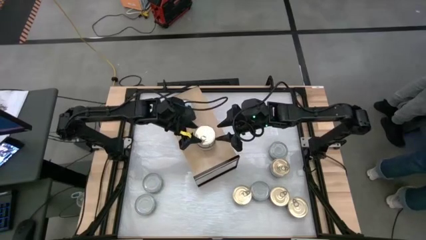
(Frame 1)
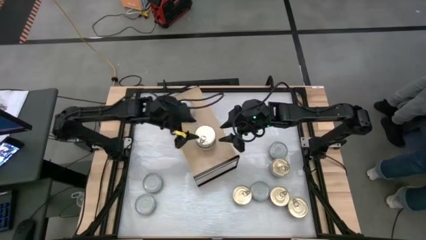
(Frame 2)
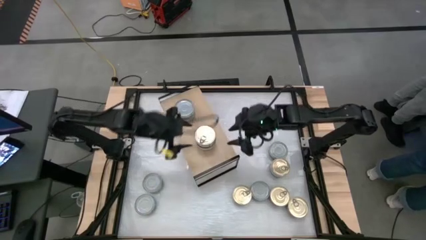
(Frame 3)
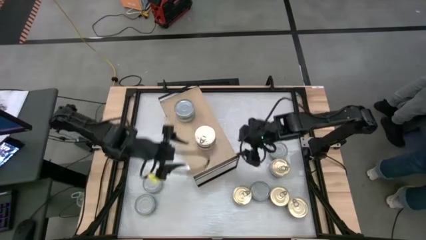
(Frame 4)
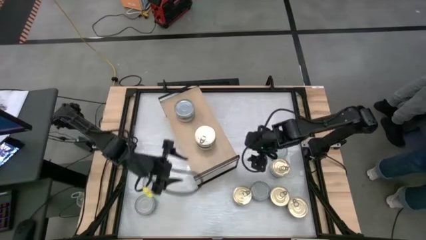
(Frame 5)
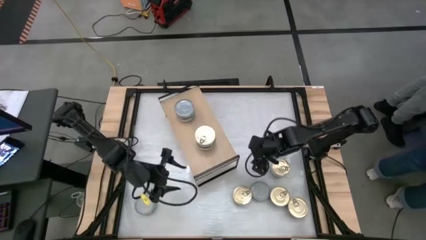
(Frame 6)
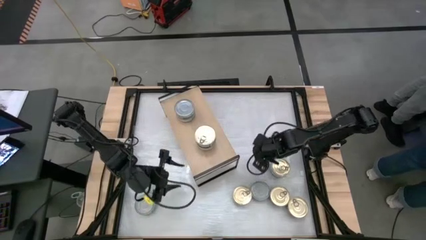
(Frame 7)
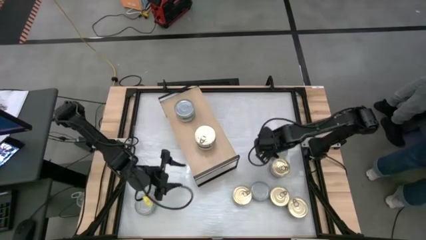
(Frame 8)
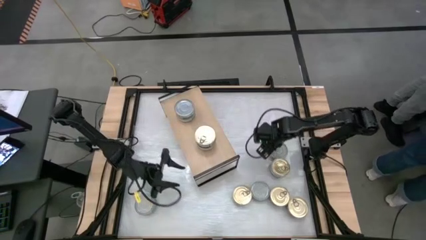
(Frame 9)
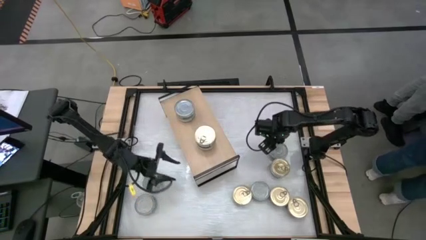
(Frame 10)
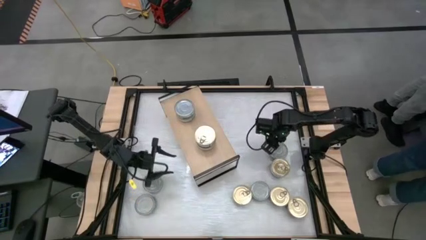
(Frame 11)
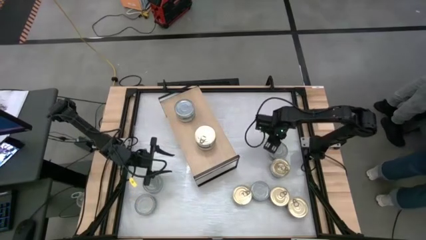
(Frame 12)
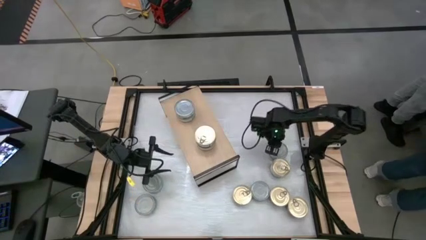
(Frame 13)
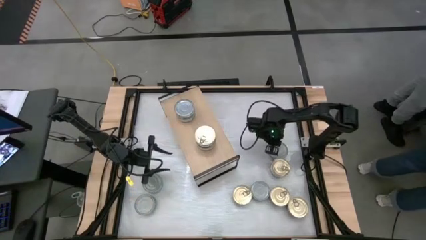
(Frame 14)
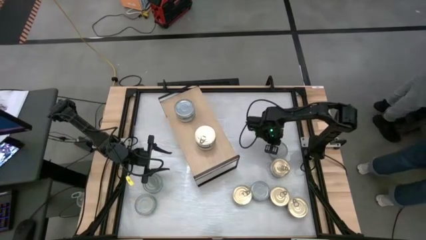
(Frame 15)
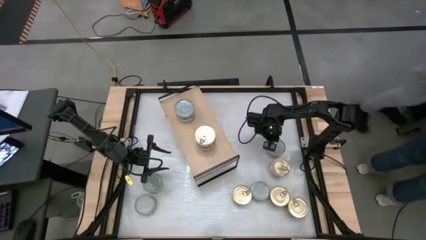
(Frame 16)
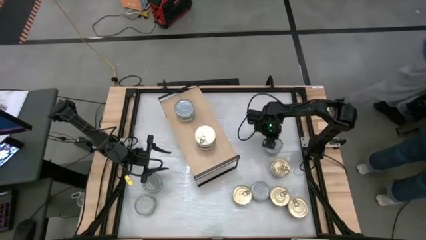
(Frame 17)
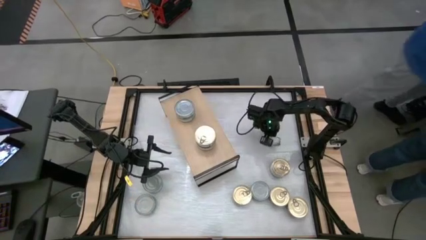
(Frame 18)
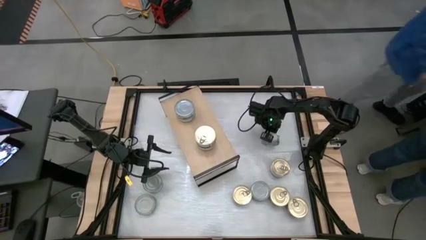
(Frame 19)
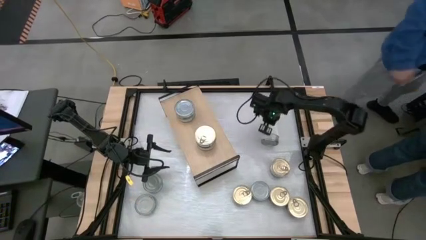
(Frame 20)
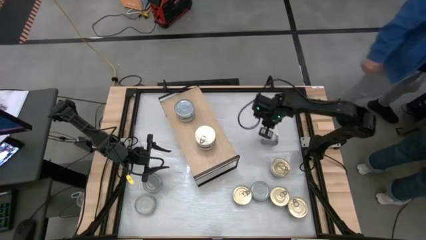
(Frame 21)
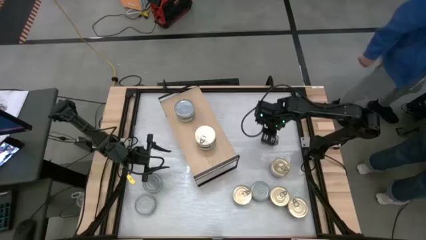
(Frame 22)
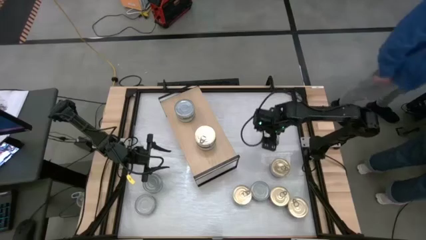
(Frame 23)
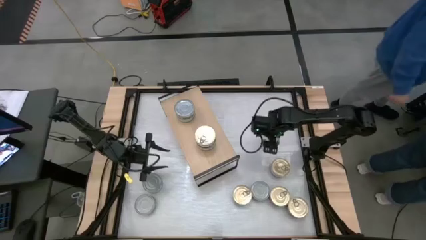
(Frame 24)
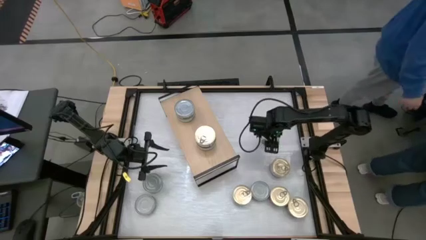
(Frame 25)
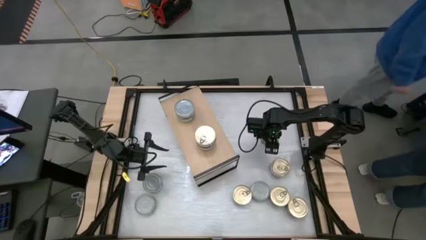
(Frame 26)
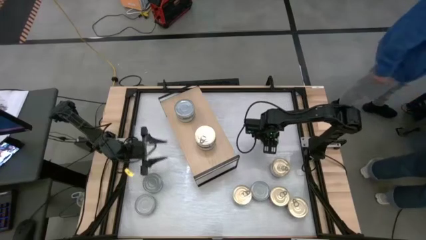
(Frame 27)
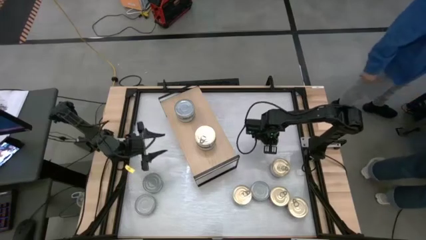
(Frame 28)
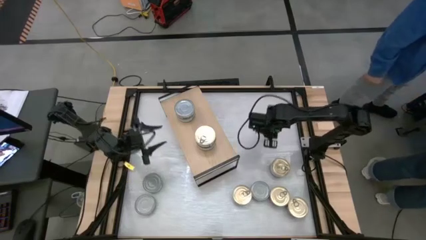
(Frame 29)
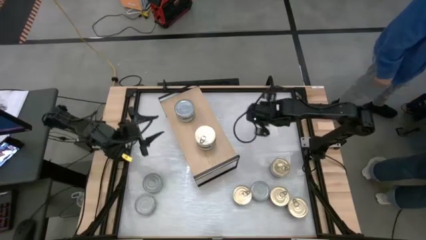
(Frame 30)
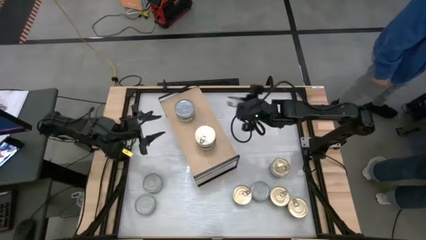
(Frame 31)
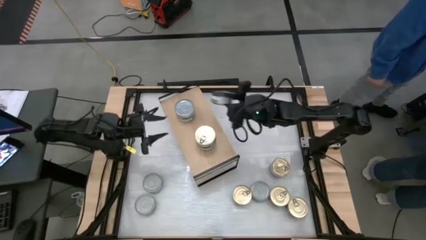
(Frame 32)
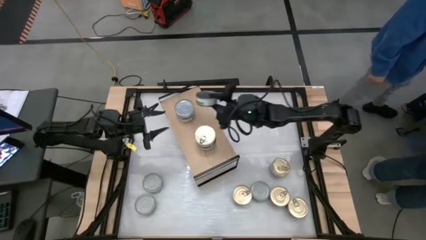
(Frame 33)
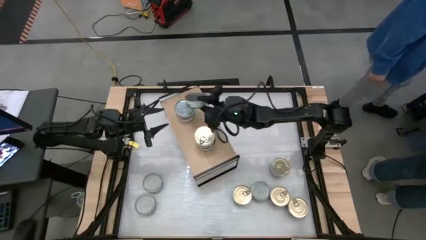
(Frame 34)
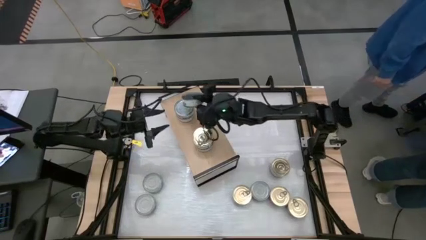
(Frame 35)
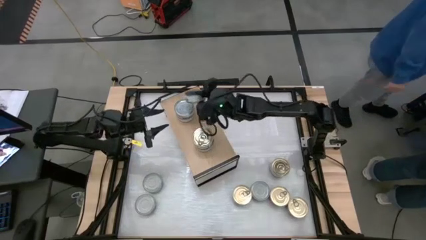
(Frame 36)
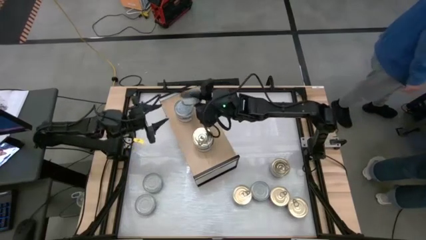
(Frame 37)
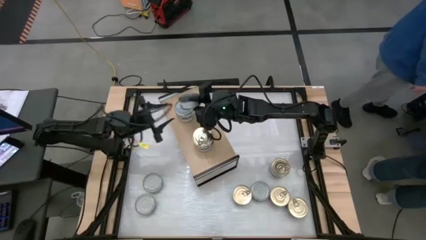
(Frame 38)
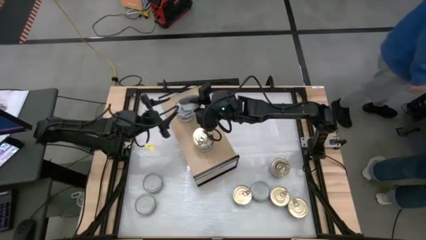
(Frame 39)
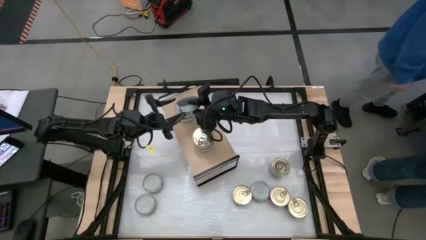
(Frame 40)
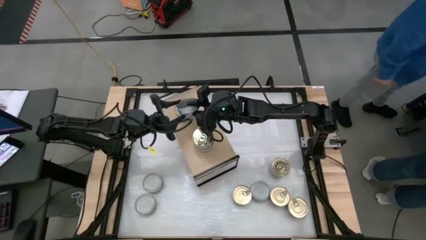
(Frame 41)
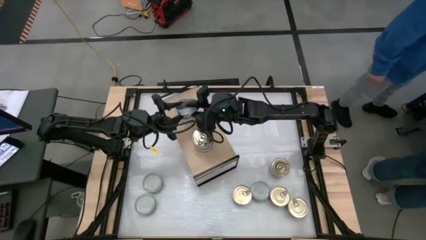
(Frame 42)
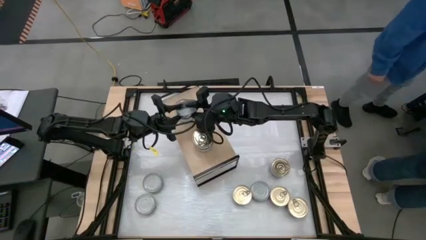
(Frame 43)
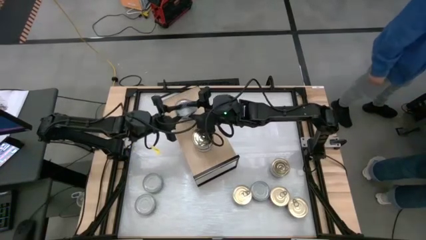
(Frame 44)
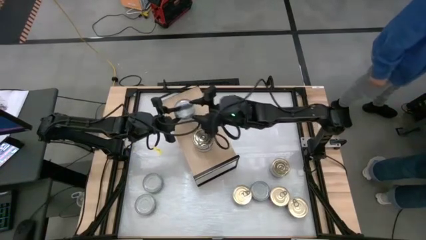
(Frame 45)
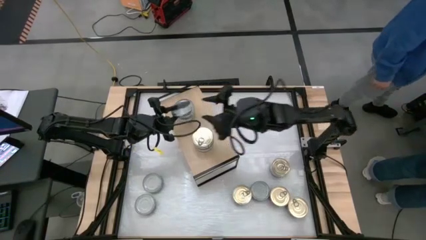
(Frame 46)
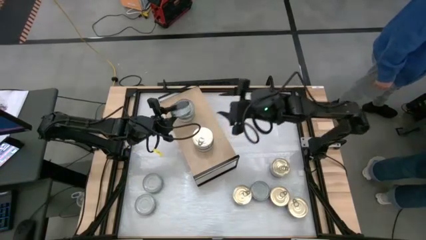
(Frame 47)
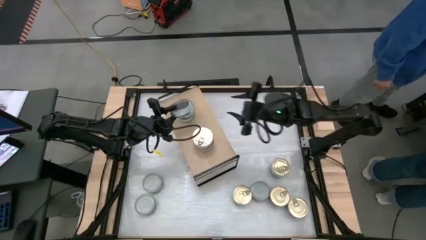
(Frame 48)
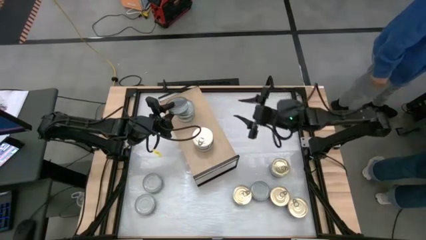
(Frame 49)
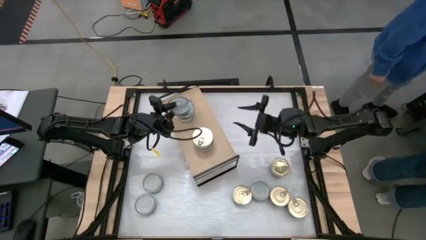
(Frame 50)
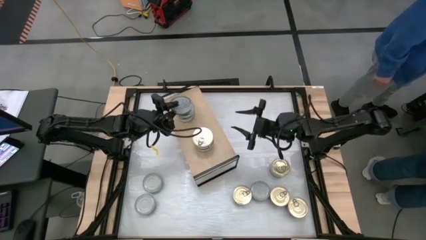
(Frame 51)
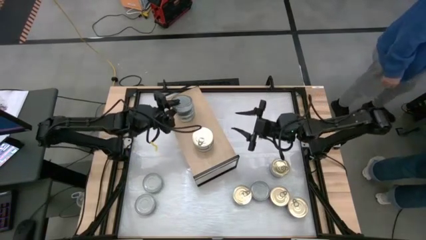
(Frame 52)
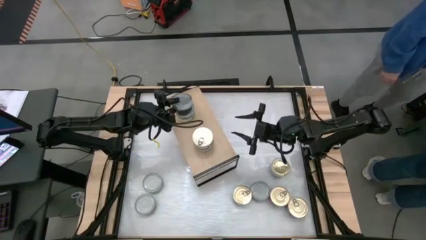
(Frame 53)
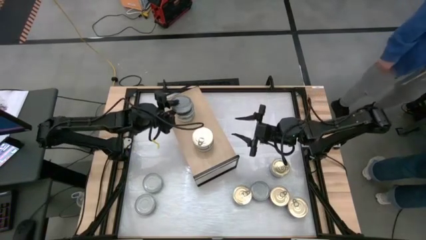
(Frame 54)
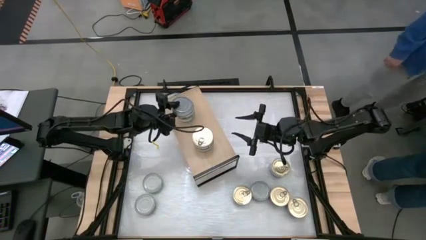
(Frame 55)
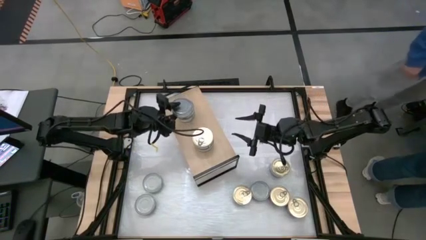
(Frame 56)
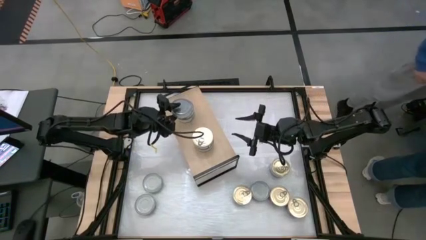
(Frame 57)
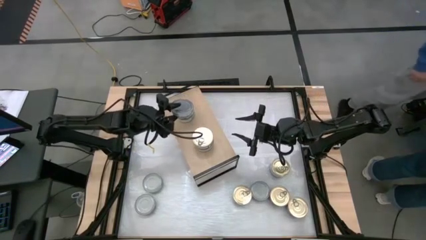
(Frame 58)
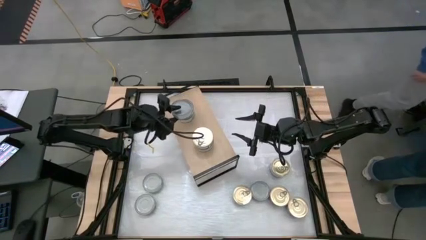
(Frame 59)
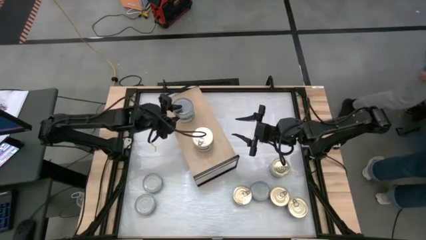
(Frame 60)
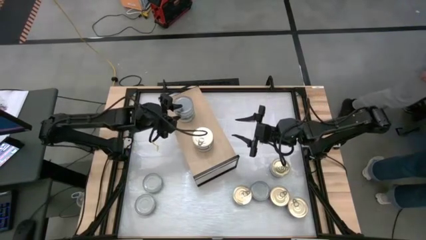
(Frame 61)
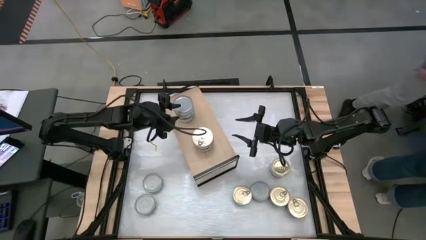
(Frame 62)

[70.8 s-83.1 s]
Task: Stack canned seafood by type on shelf
Stack the green tuna can on top of the other green tuna can on the shelf

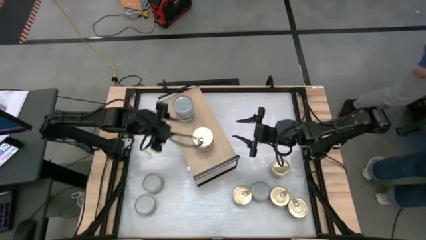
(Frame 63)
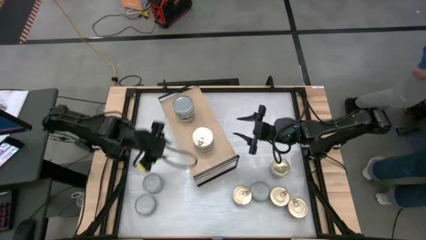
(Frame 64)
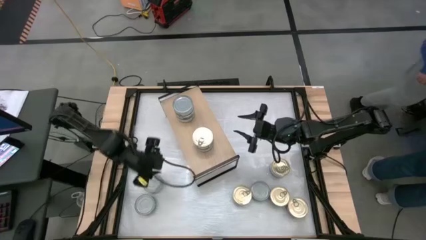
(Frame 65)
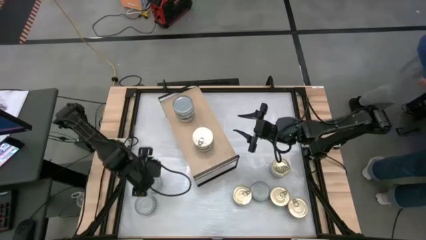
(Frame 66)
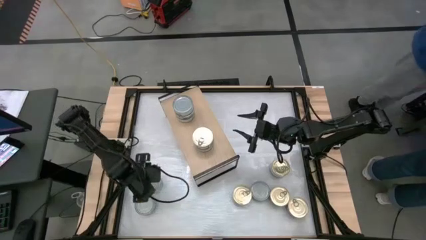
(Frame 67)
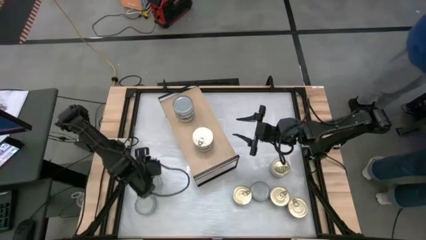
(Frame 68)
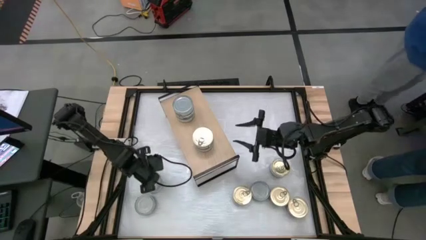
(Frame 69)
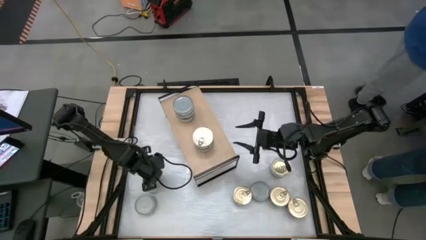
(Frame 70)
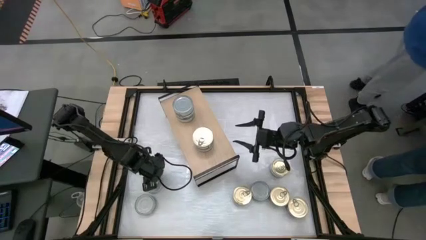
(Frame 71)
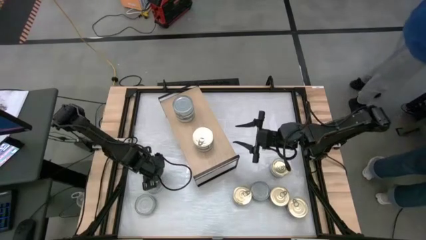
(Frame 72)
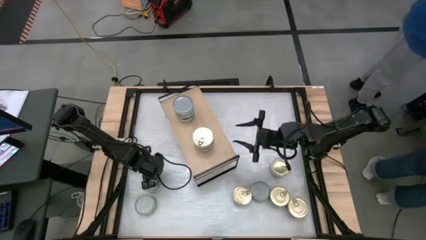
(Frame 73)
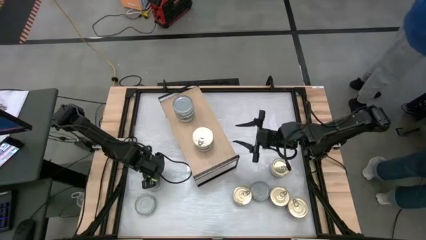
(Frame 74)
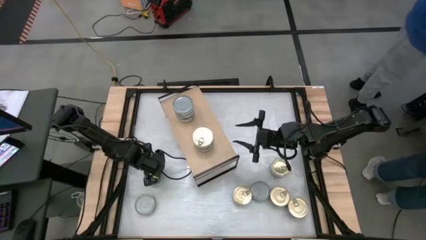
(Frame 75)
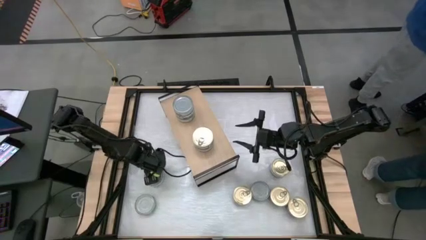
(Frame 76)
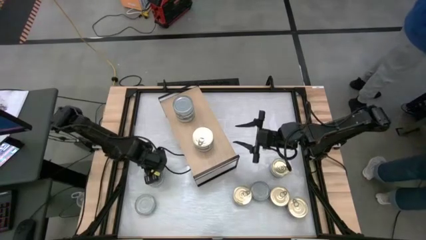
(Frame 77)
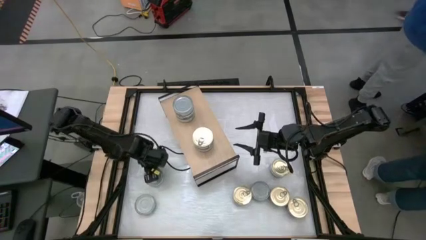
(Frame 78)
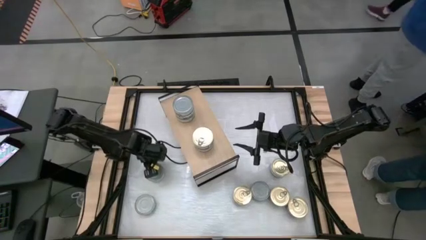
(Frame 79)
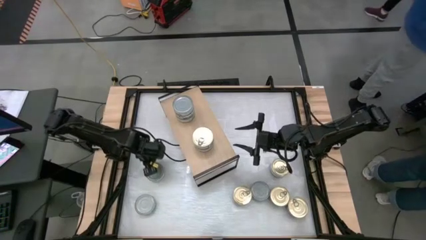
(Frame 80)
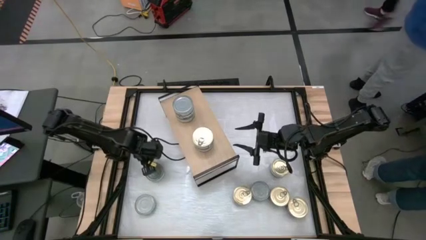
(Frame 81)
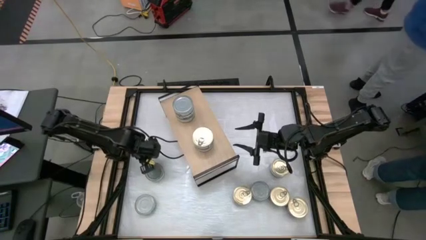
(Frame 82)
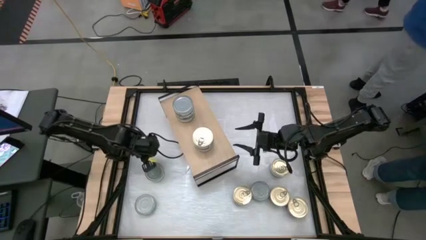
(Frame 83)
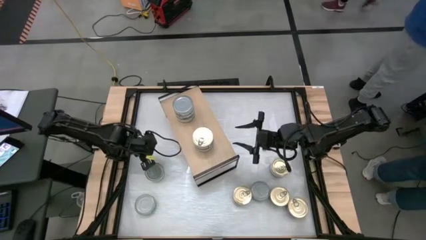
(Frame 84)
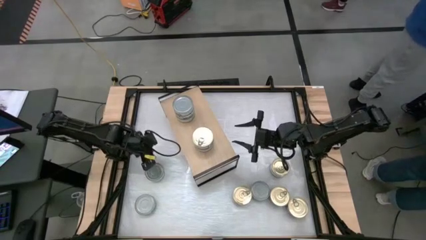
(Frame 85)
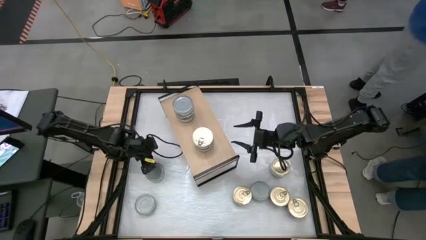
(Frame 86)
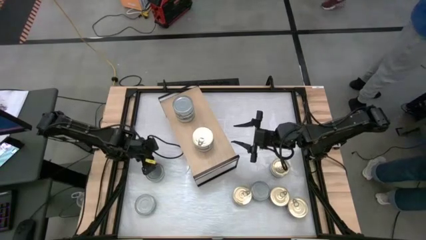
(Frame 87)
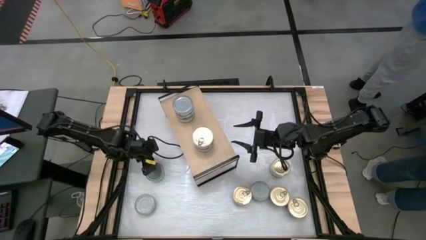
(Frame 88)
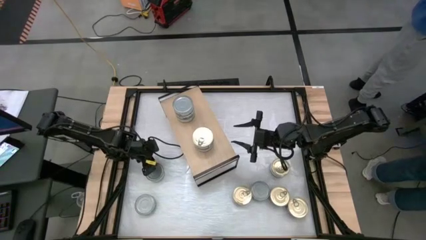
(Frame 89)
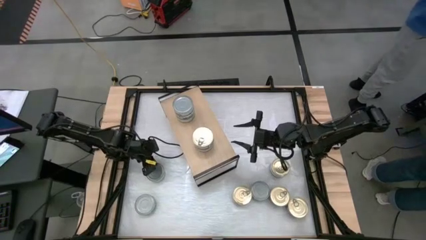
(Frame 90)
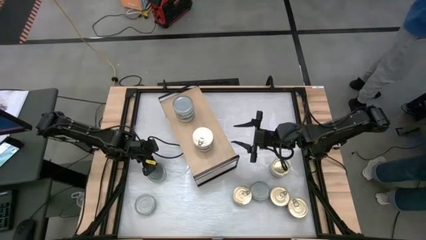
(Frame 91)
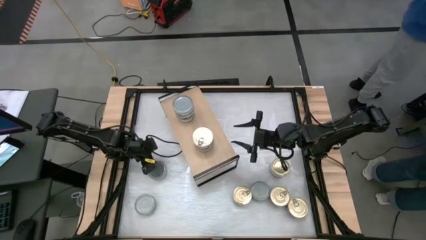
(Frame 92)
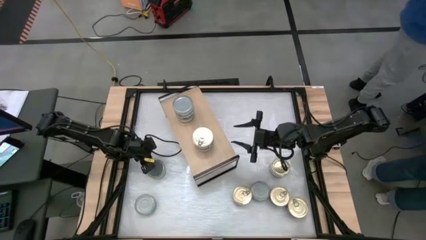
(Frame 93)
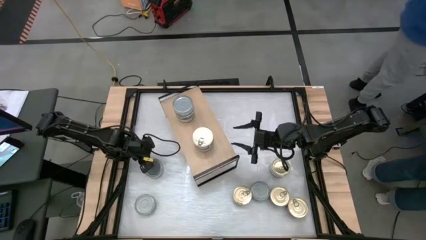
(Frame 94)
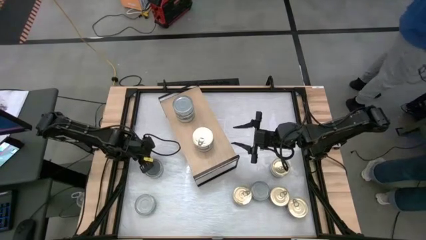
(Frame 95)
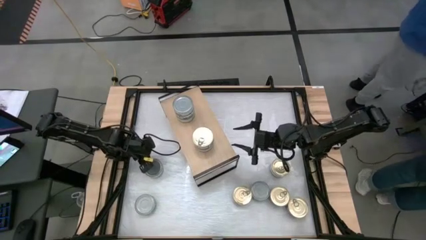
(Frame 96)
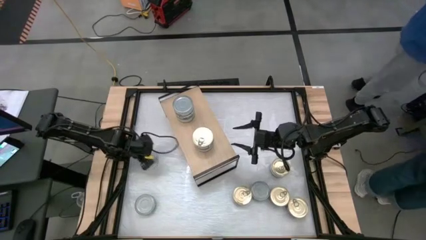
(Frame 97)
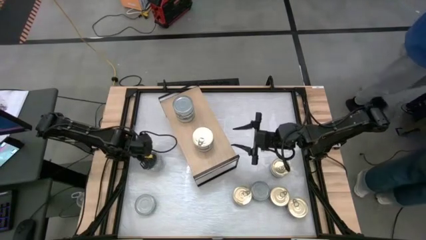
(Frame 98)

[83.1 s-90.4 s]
Stack the green tuna can on top of the other green tuna can on the shelf
